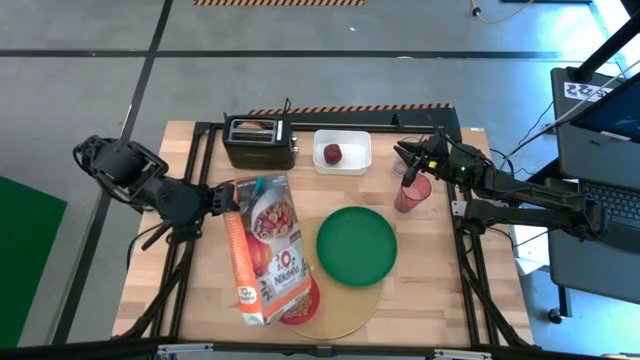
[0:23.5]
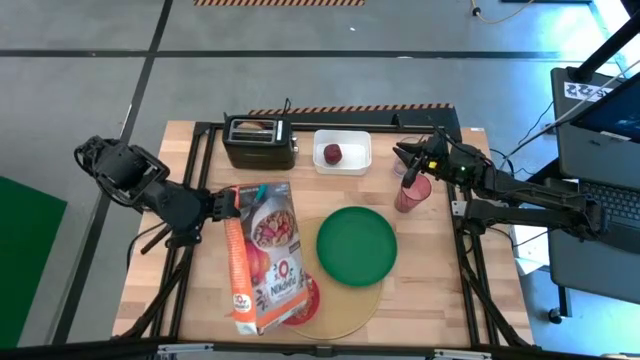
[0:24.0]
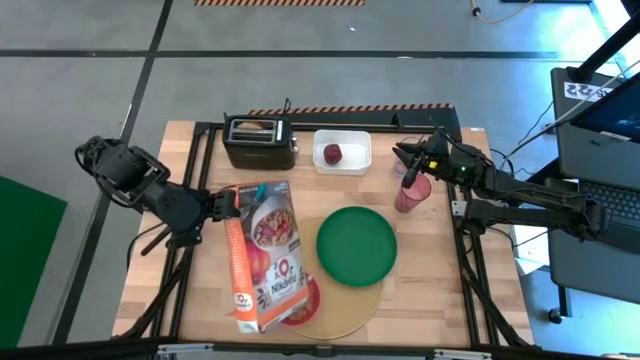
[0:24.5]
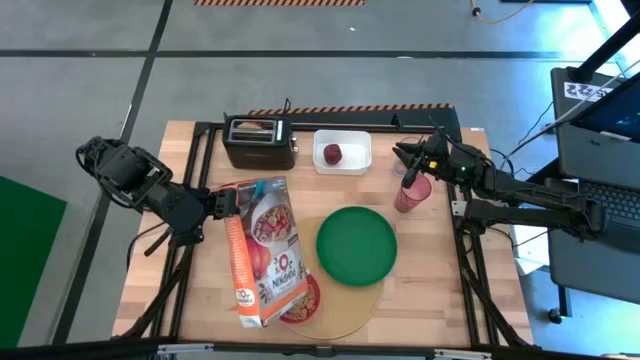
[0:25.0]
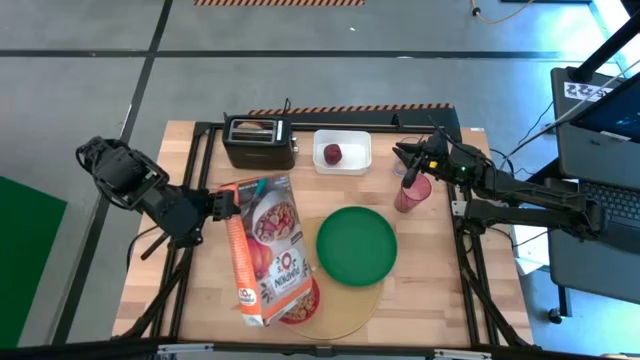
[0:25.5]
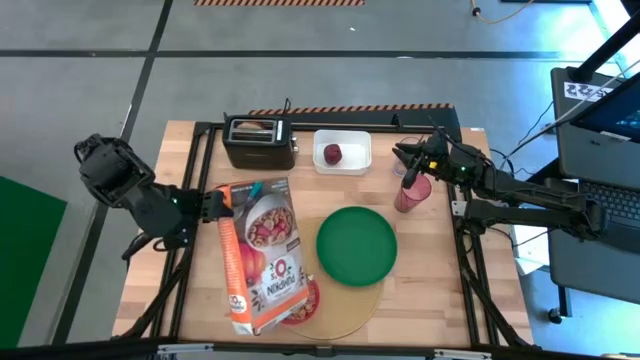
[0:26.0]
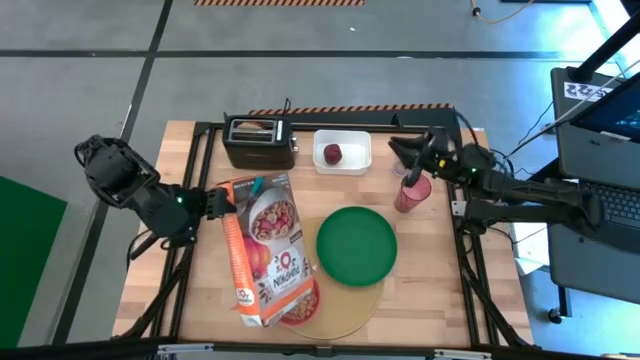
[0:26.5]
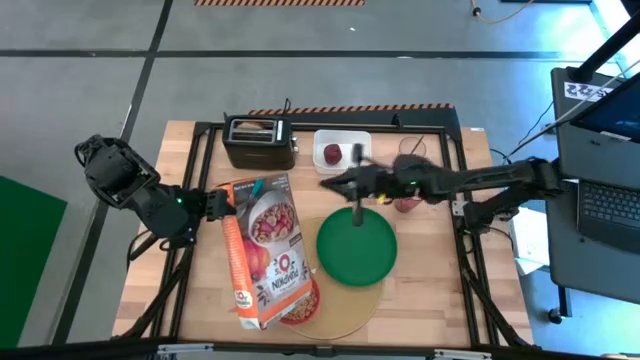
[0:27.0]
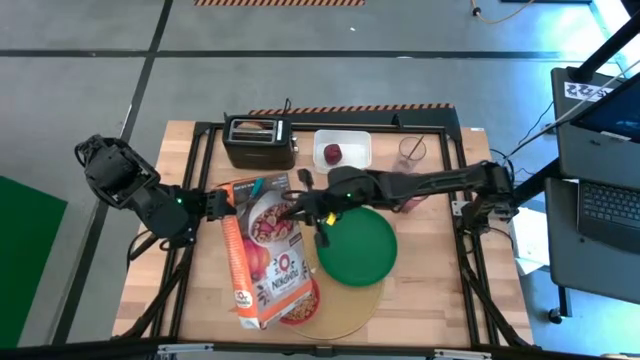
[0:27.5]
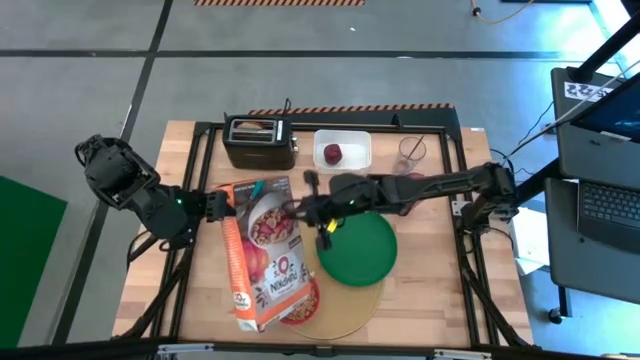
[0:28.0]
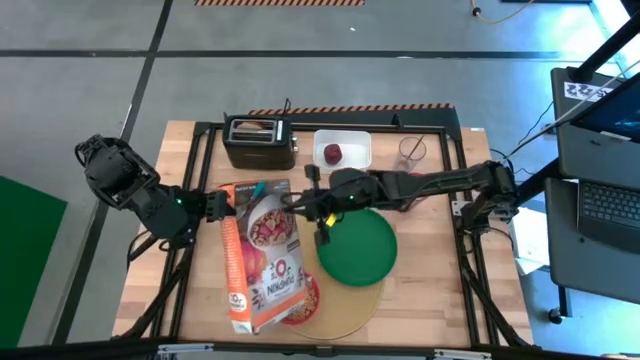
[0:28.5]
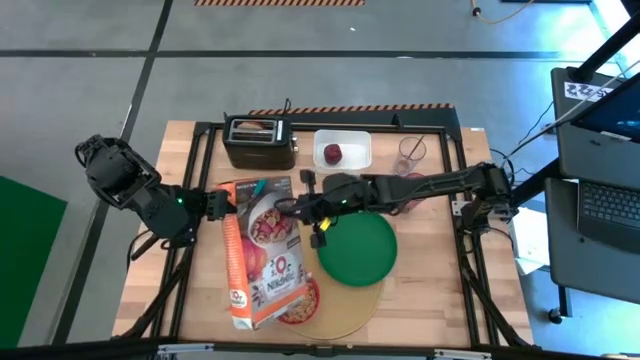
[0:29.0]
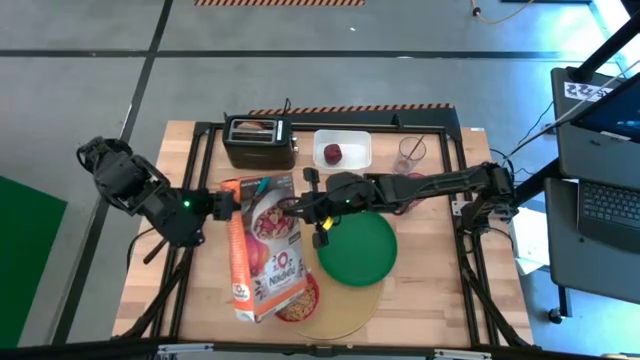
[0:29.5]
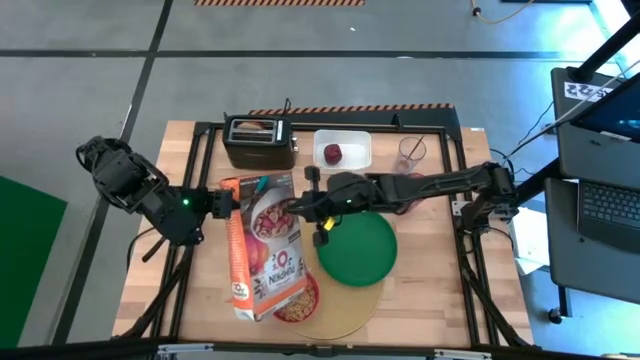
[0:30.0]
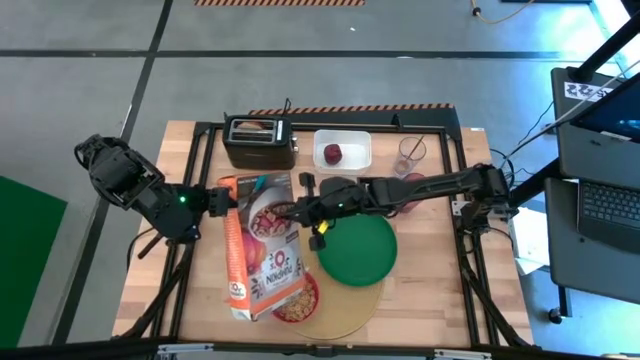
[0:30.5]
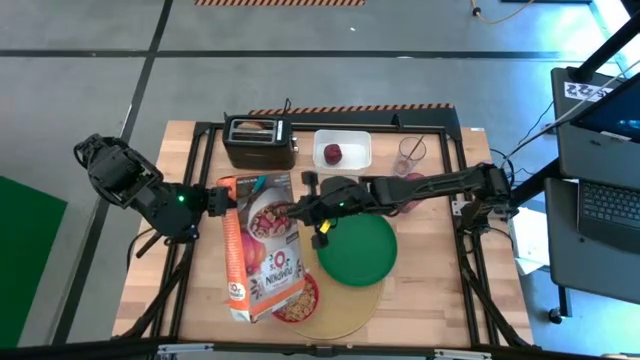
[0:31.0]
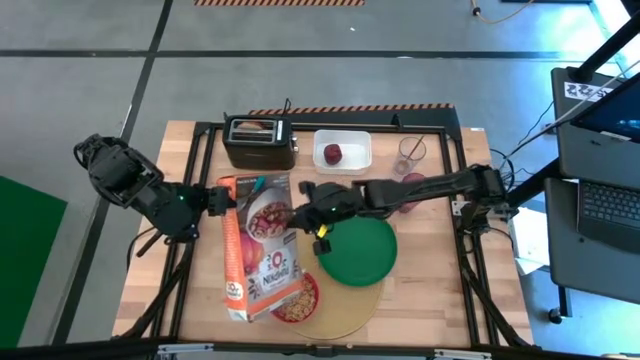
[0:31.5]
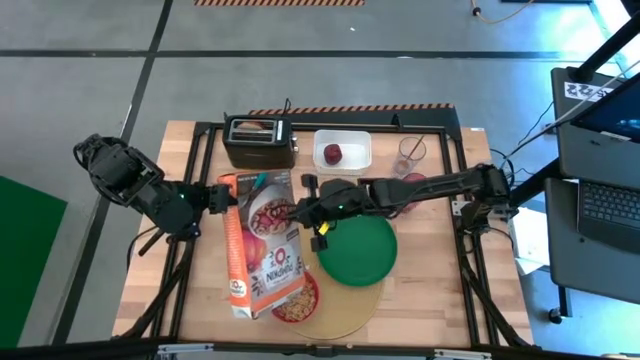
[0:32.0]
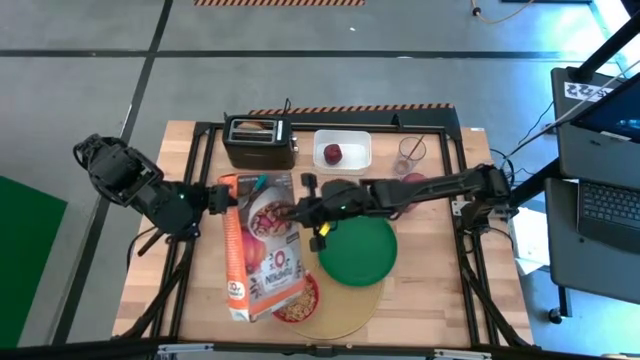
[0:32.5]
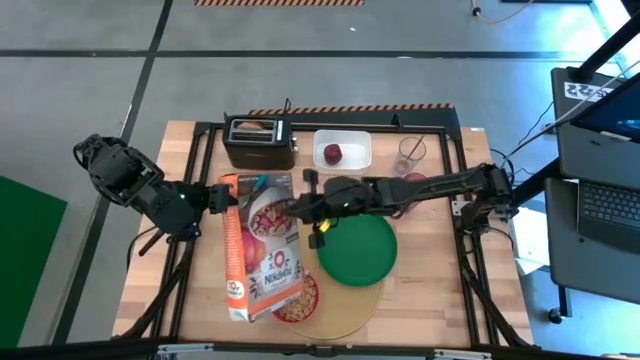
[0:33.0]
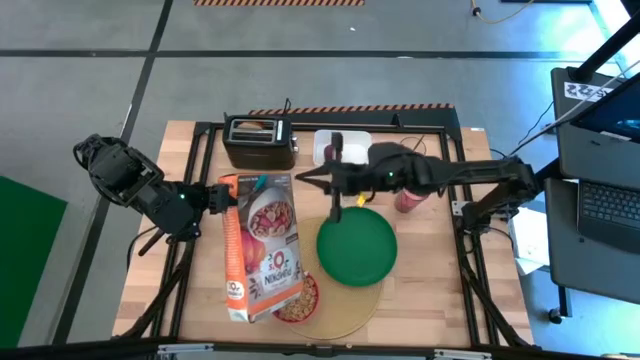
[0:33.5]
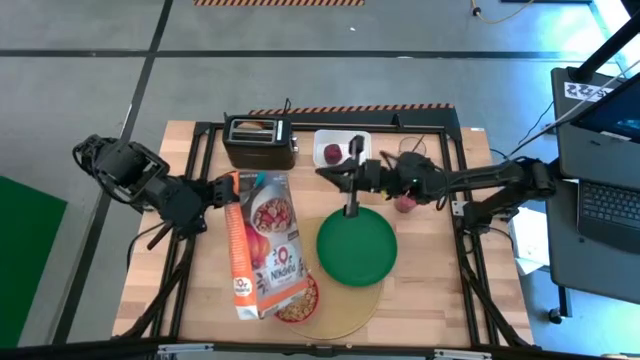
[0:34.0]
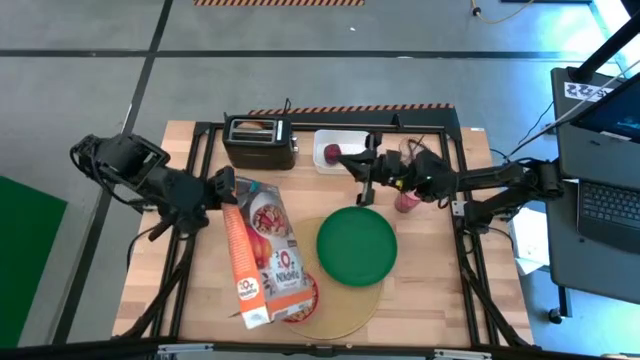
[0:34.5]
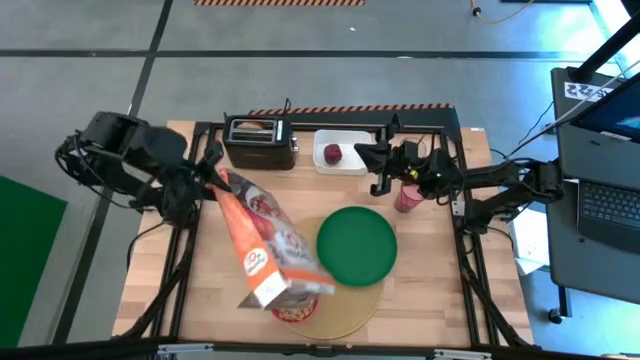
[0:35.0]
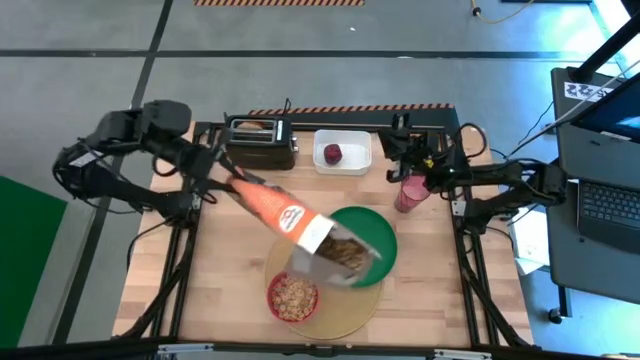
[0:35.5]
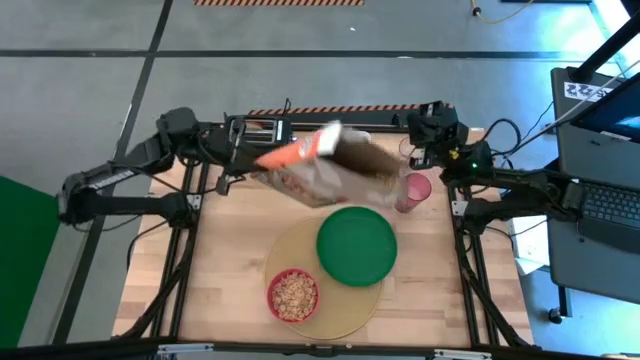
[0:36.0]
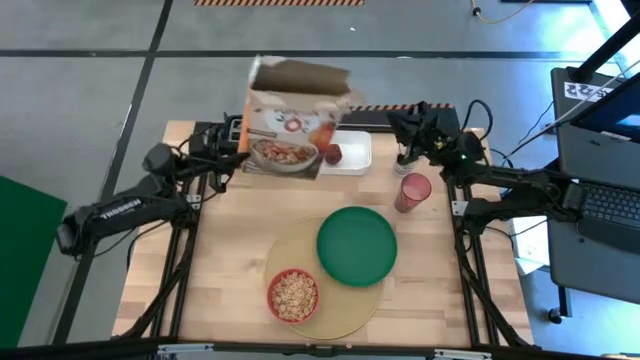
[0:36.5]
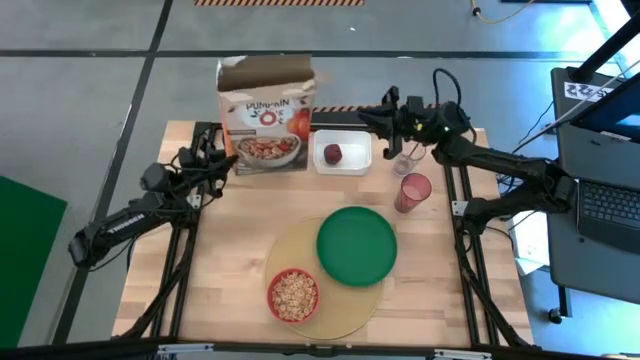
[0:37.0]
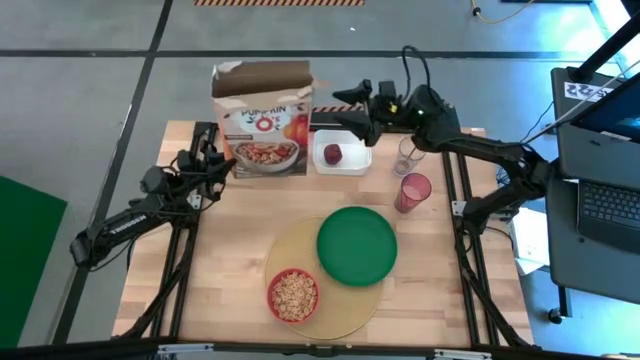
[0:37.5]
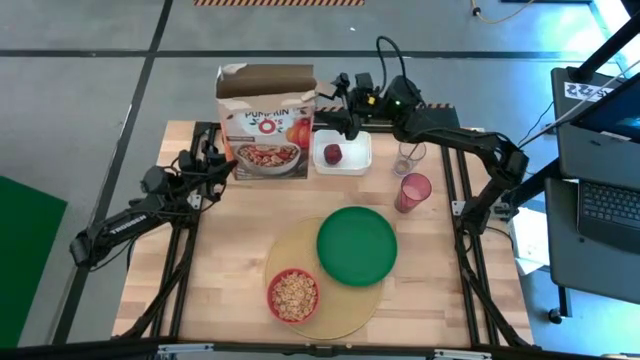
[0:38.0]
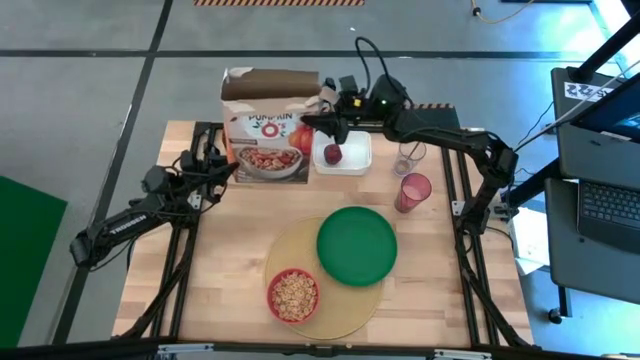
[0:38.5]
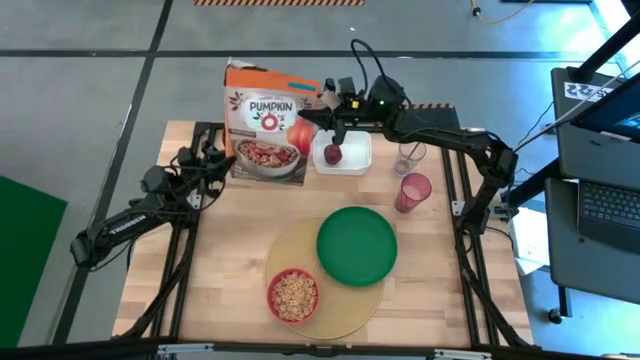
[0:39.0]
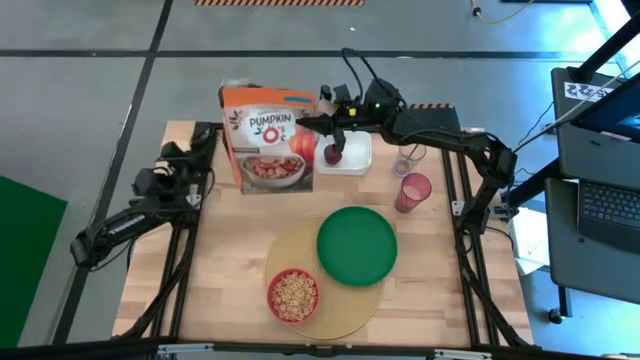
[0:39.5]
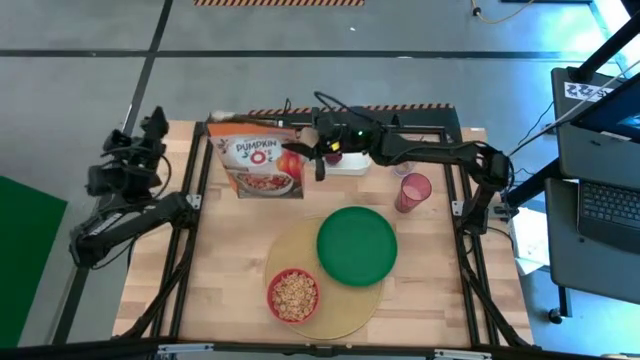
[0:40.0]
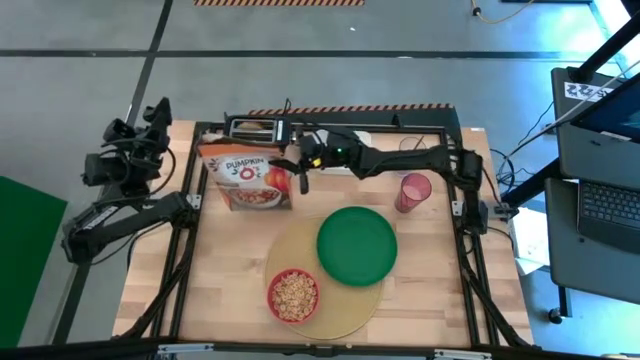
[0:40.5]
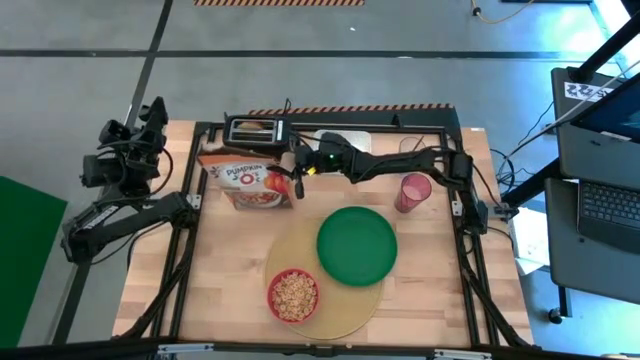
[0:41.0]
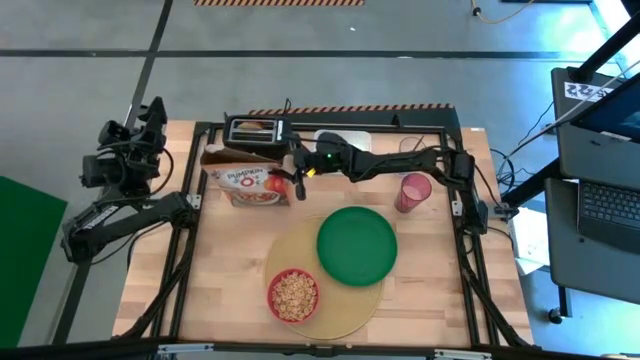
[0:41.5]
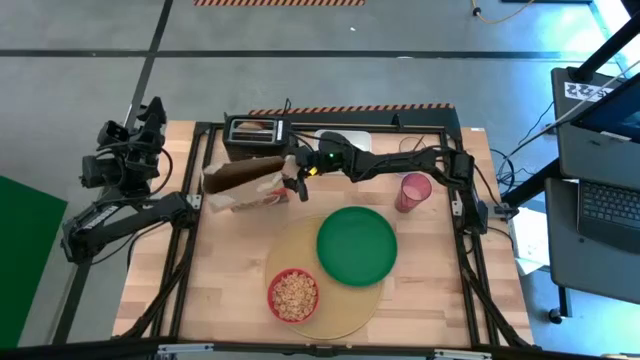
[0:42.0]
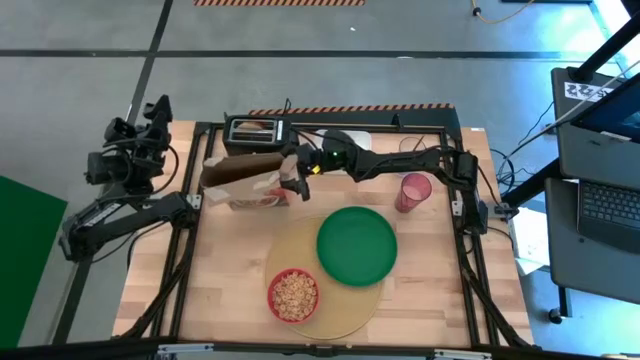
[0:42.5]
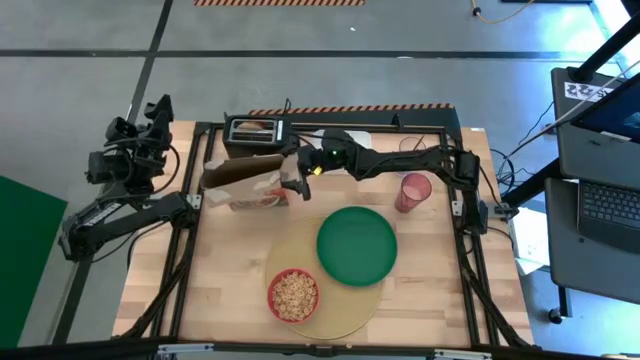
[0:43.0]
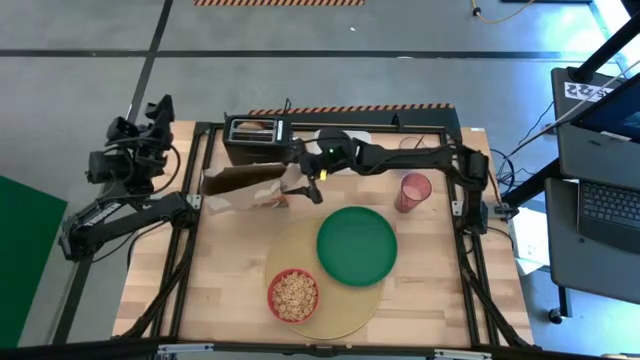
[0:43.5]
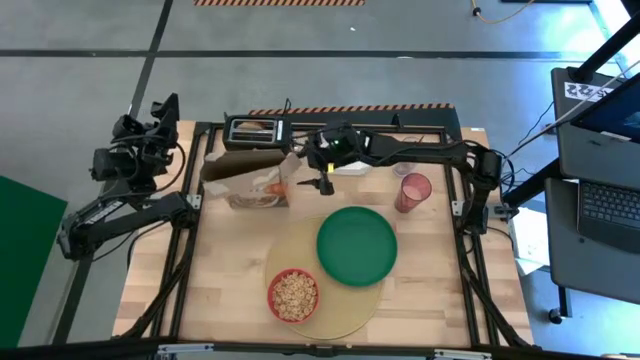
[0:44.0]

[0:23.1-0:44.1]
Task: Arrange a breakfast setting
Pour the cereal from the cereal box into the orange bowl
